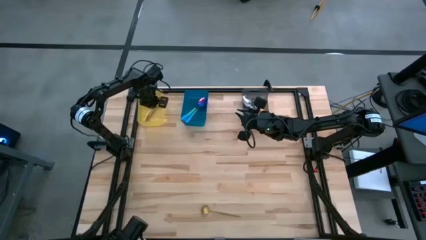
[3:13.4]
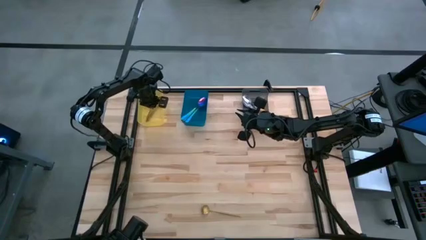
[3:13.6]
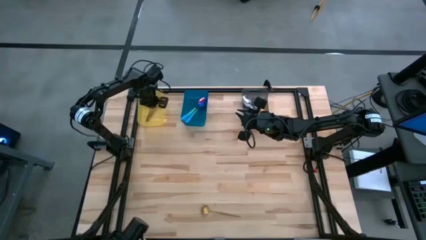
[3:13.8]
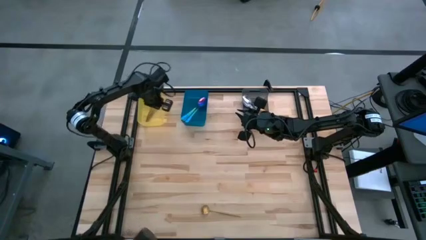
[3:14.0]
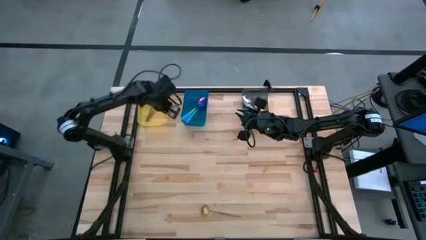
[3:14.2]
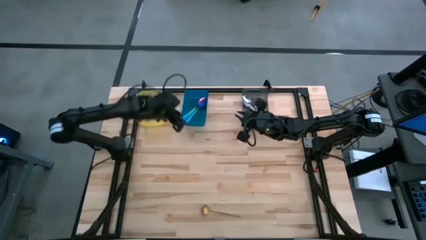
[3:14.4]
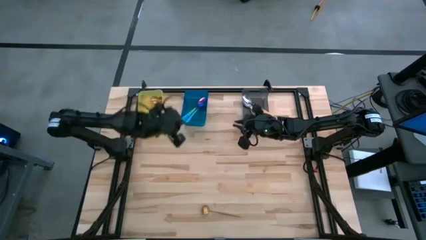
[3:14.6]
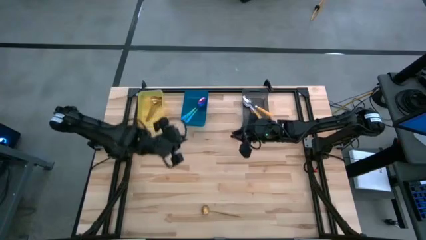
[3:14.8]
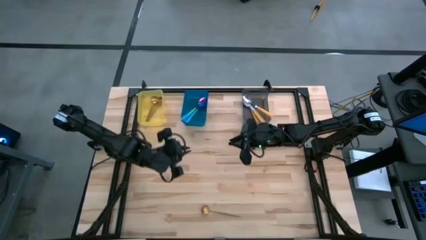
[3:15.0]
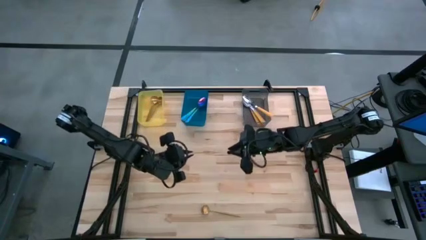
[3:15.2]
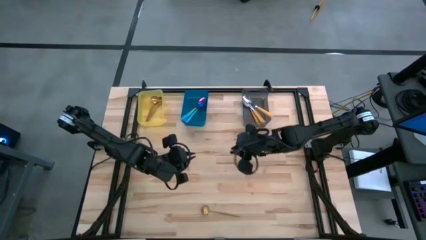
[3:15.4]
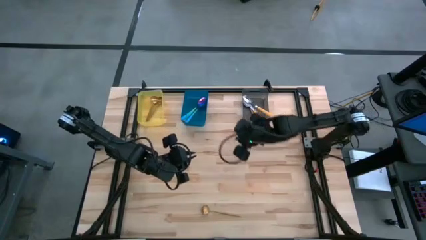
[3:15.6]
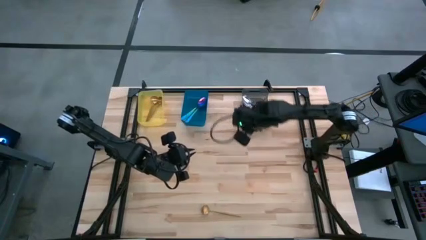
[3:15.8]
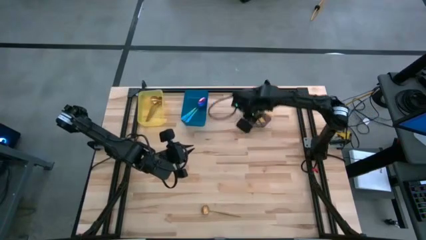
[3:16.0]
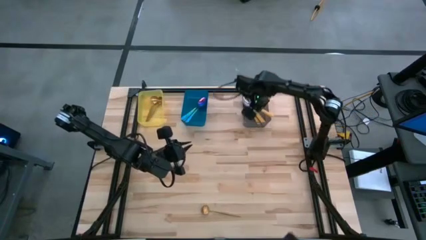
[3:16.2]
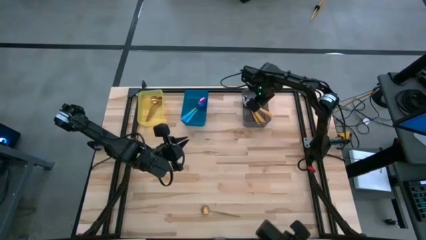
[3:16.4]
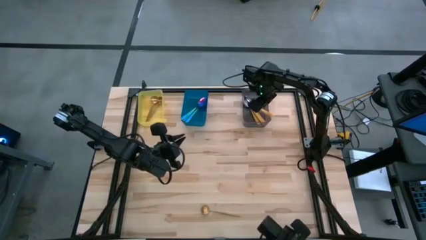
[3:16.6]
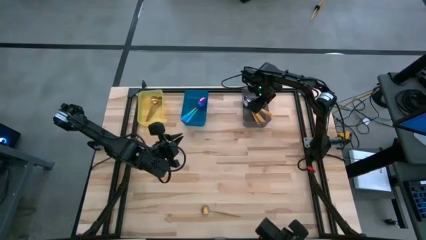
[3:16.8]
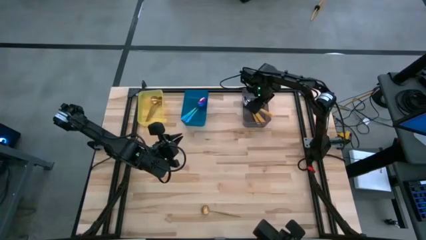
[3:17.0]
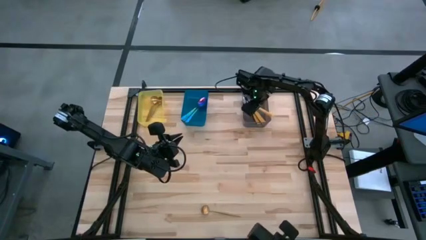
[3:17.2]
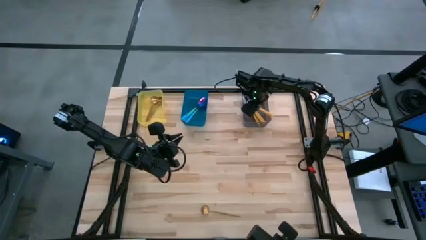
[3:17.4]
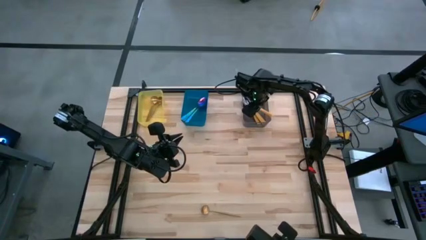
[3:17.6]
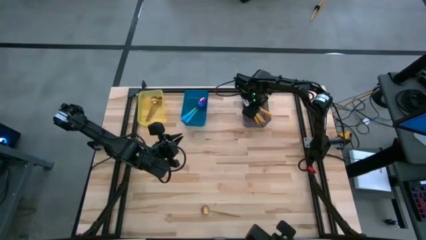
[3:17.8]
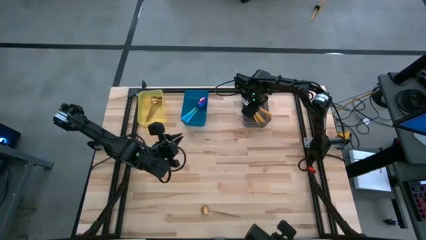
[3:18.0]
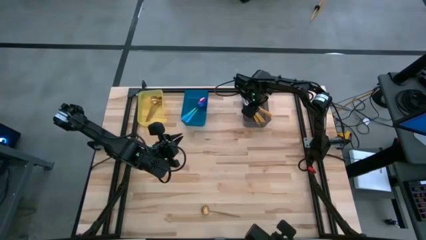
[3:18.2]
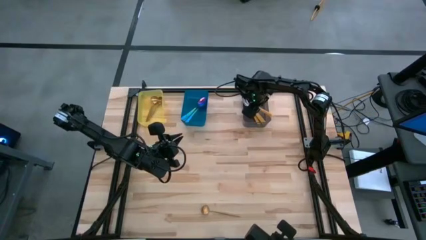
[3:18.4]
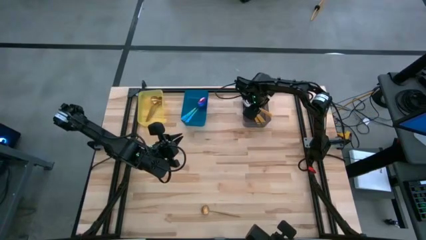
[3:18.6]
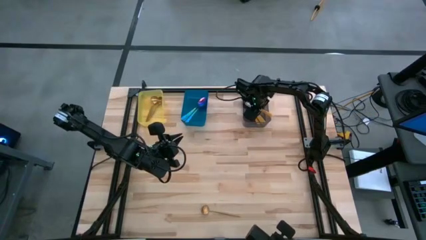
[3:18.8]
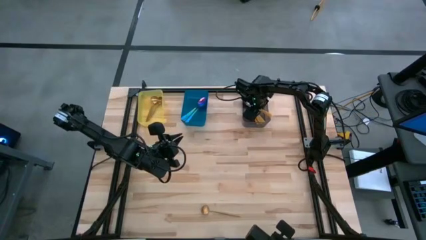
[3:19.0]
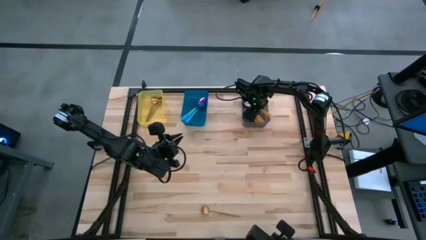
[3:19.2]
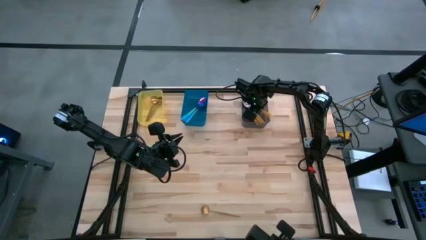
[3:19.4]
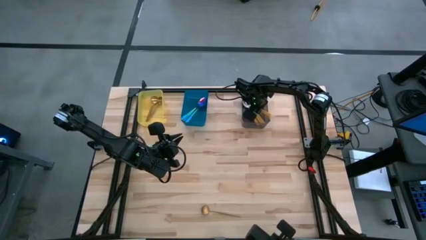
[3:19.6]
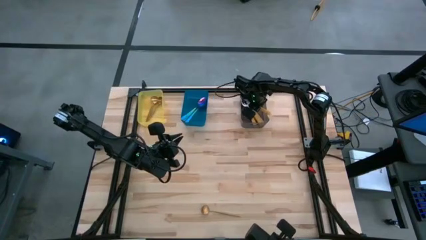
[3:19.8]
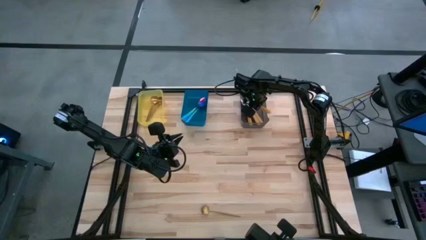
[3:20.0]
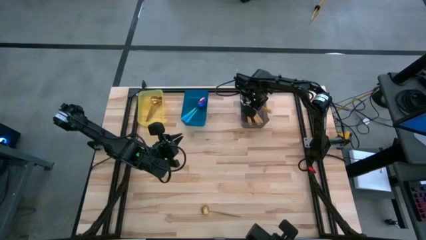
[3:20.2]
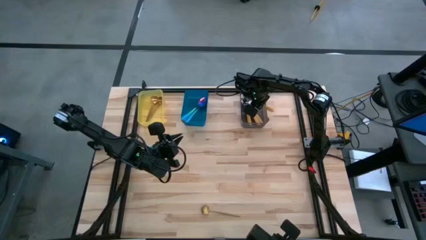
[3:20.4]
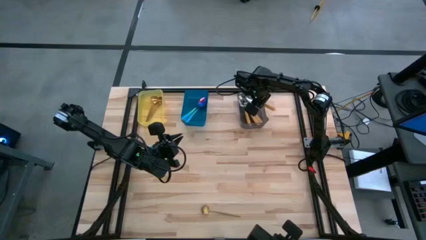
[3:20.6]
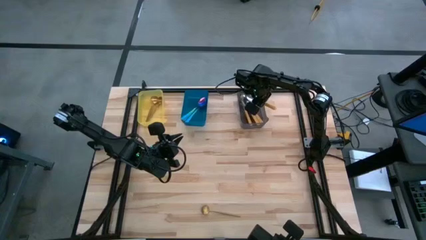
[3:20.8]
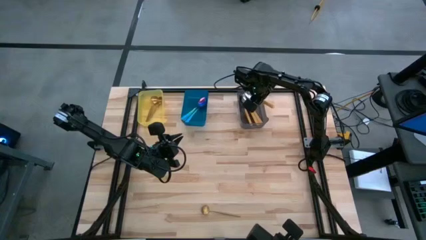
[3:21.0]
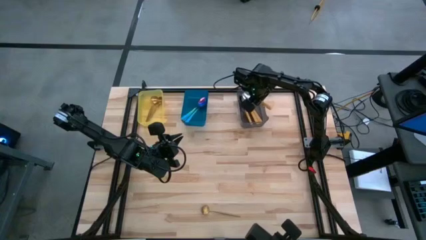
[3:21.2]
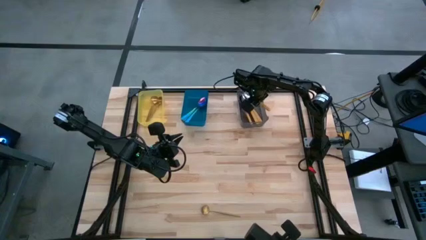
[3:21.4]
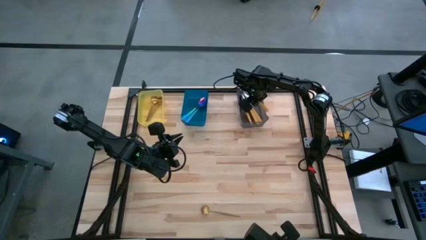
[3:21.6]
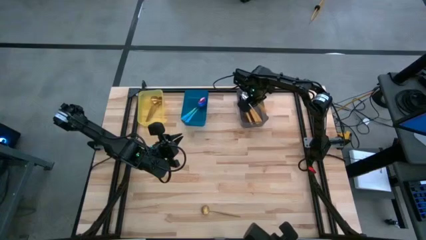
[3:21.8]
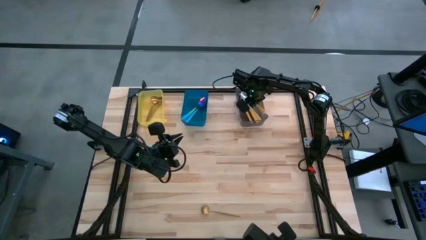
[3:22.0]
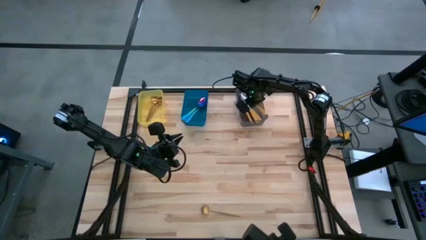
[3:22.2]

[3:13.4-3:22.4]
Task: Sort silverware by color (type)
Adjust the yellow spoon in the black bin

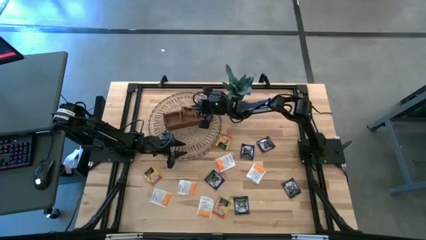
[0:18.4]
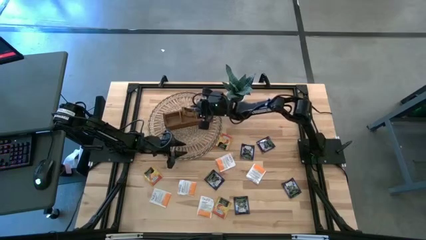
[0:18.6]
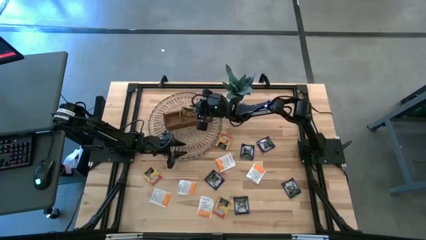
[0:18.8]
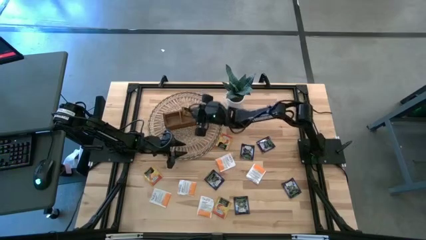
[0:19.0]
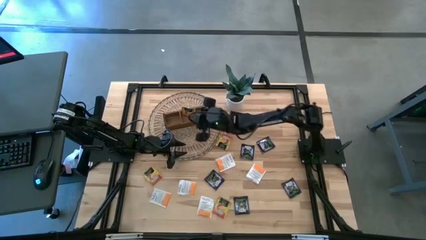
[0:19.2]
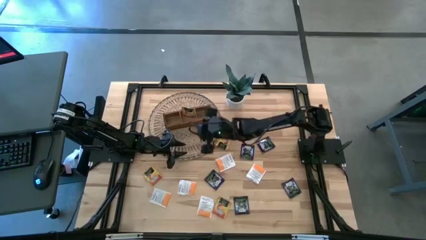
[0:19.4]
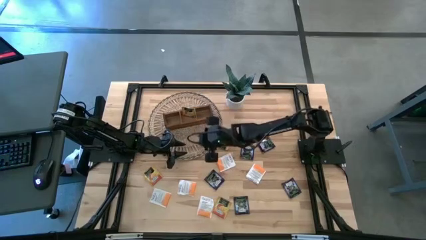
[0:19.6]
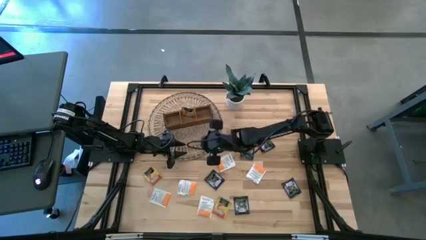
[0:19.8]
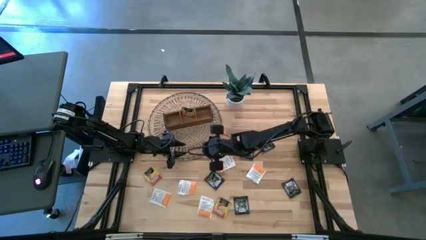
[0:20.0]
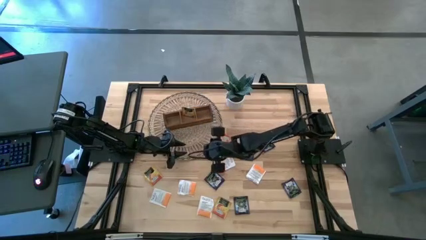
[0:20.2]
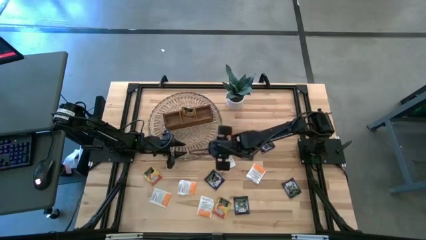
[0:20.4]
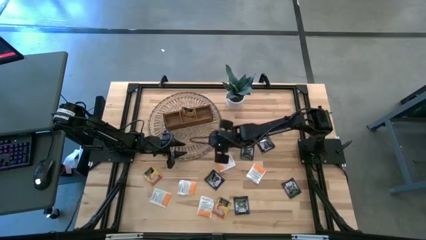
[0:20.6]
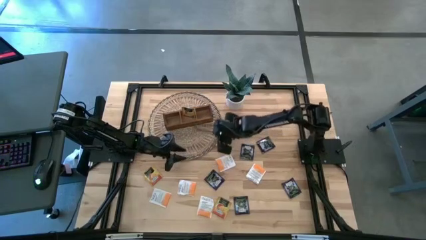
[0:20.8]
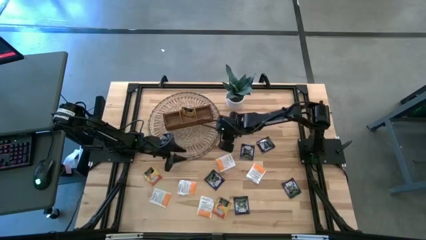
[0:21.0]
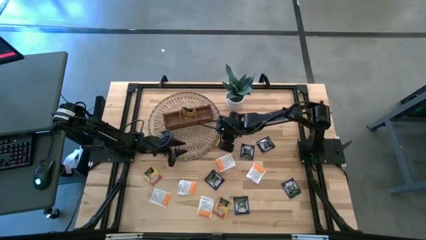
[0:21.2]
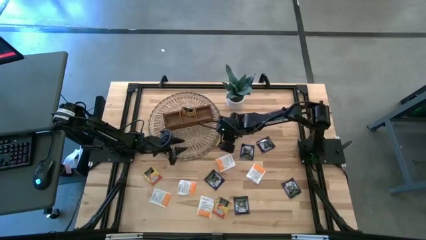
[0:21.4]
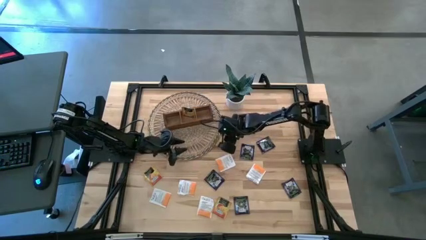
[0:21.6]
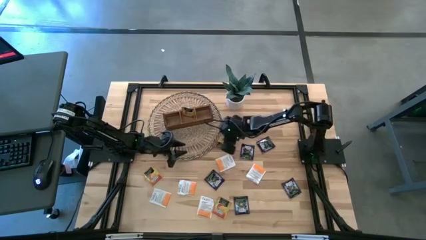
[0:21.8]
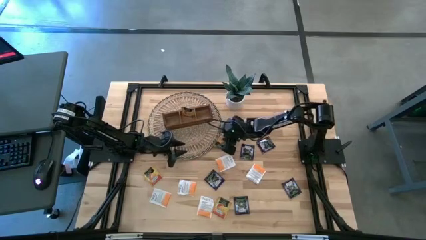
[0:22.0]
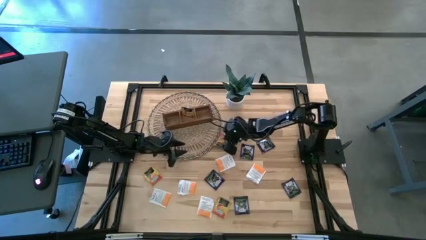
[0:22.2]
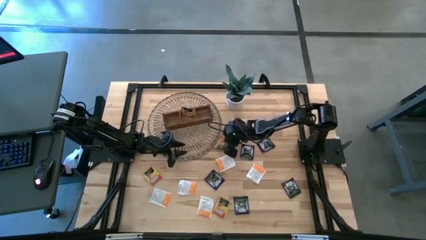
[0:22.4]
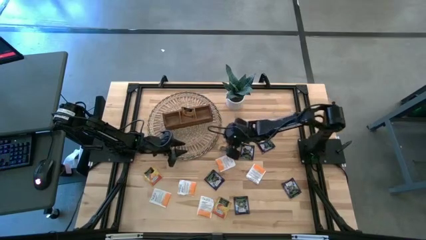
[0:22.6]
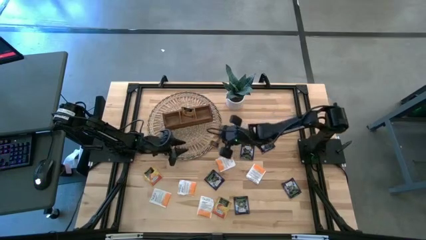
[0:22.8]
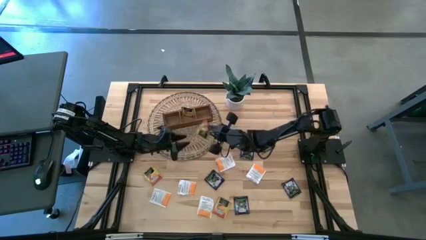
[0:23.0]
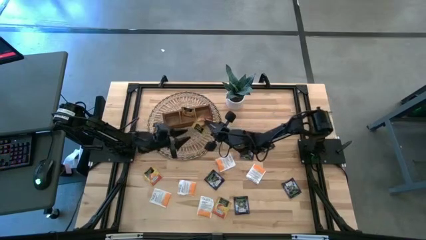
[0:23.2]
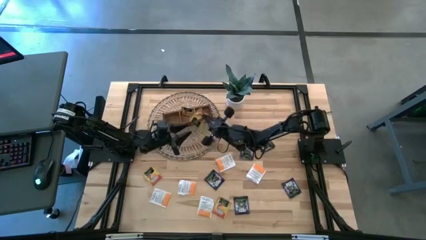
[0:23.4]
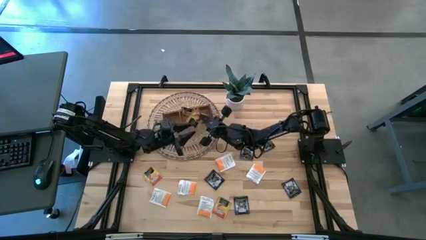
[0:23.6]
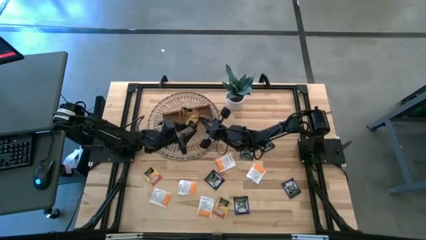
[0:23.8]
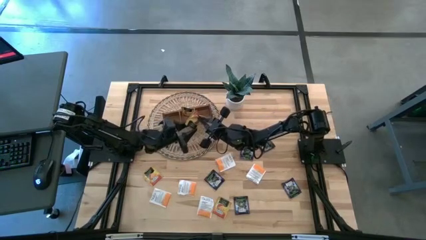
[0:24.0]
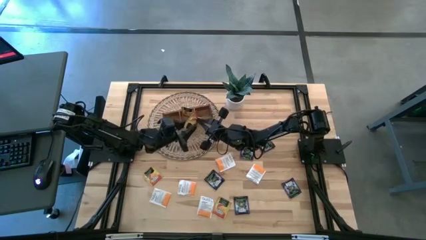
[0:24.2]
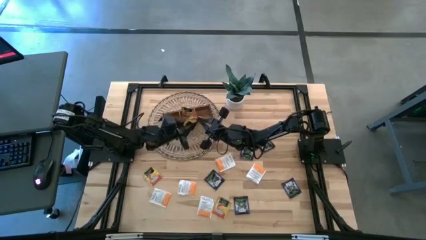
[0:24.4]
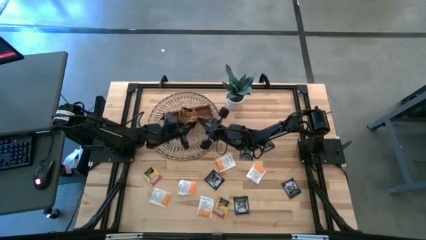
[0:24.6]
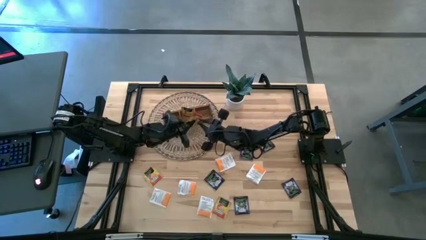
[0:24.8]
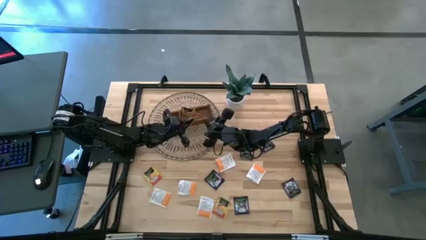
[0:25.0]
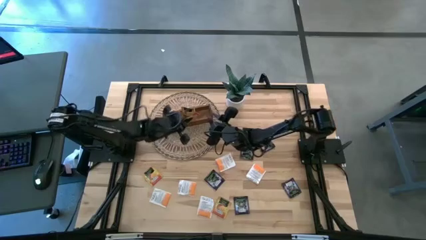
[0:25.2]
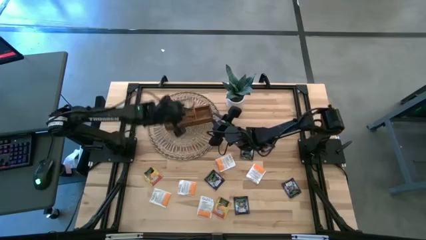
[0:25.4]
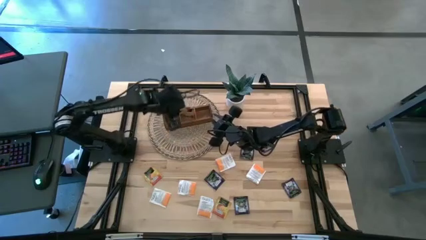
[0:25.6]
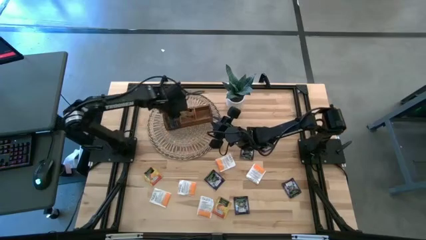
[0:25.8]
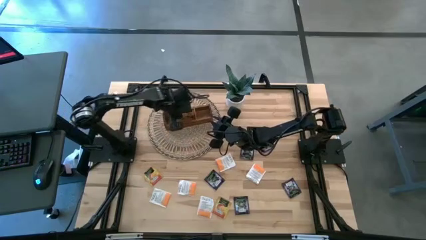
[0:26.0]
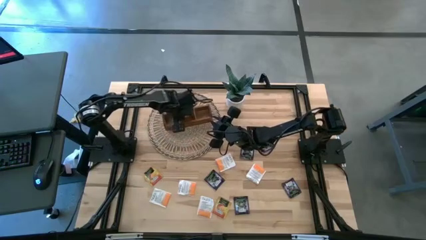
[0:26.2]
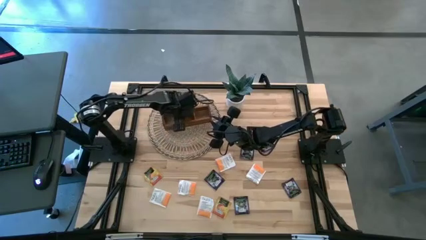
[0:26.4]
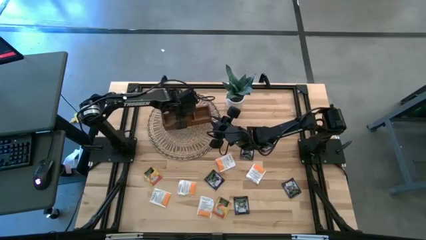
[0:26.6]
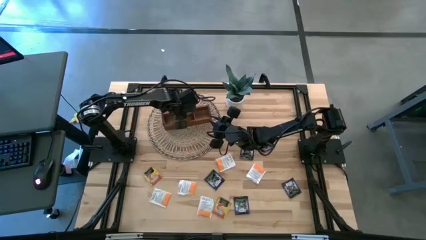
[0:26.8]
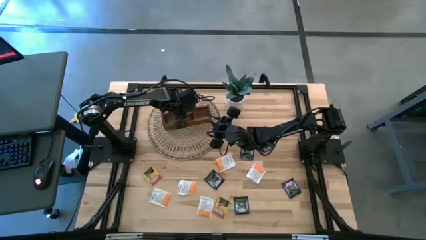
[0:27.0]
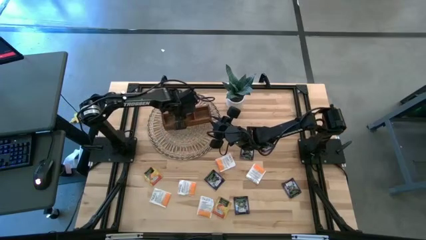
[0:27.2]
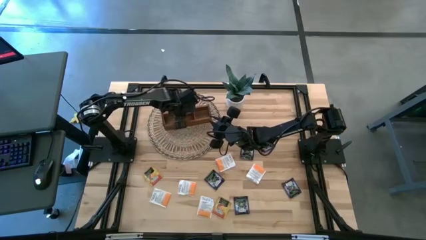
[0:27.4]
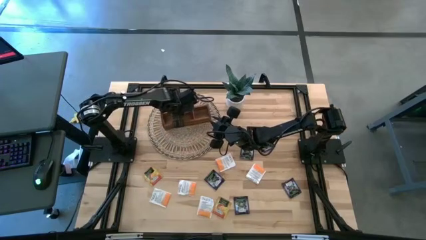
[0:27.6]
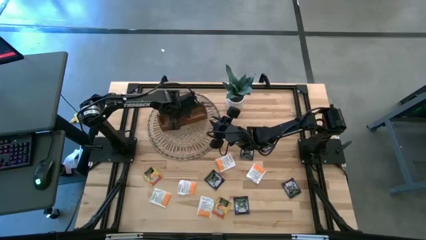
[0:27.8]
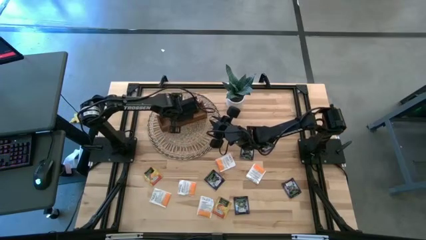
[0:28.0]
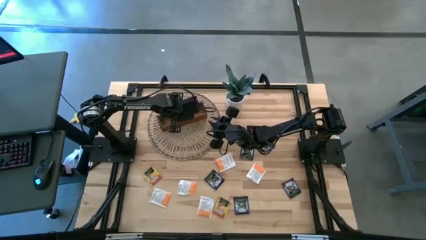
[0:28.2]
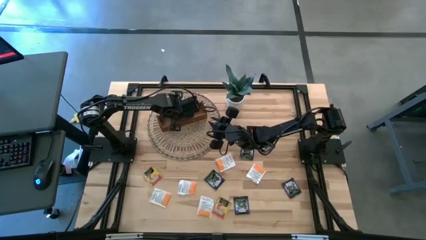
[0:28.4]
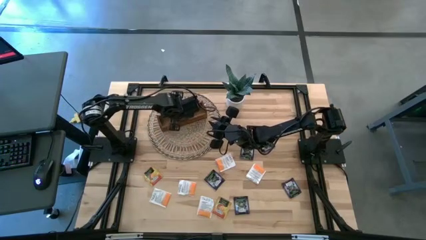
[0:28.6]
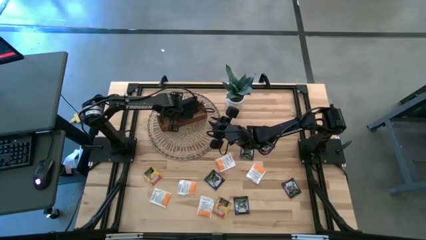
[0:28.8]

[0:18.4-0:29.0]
Task: Pick & Place Tea
Put the yellow tea bag into the middle section of the wooden organizer
